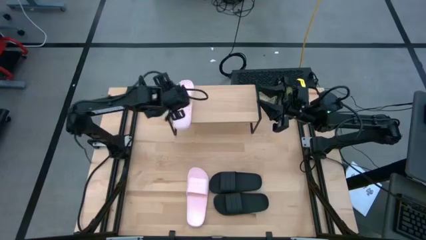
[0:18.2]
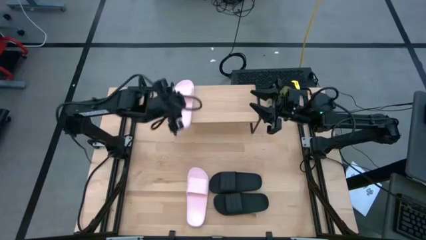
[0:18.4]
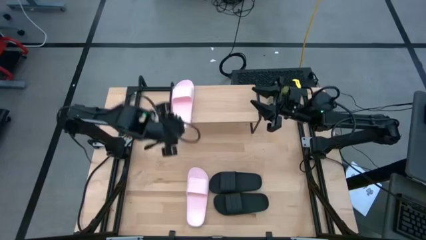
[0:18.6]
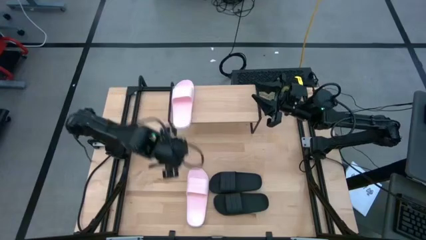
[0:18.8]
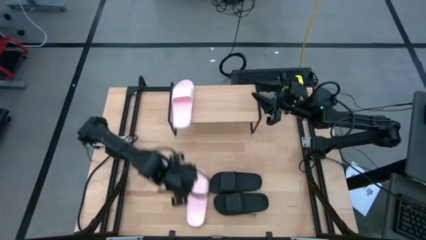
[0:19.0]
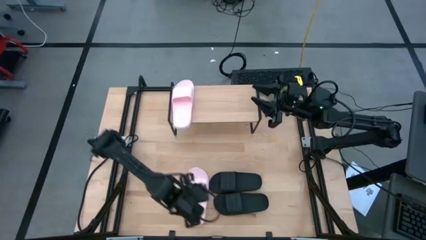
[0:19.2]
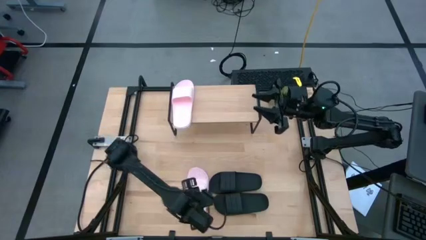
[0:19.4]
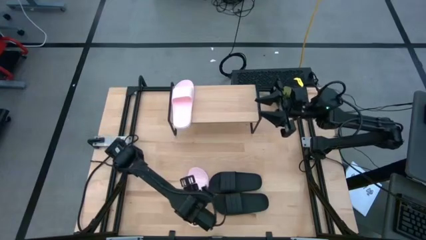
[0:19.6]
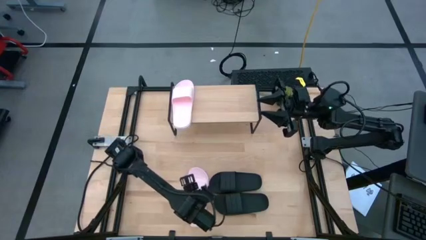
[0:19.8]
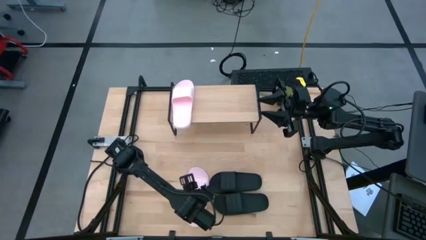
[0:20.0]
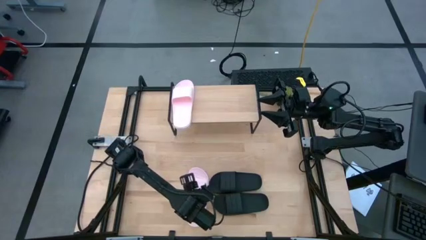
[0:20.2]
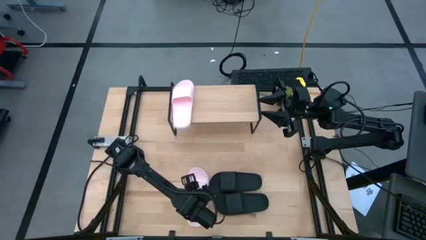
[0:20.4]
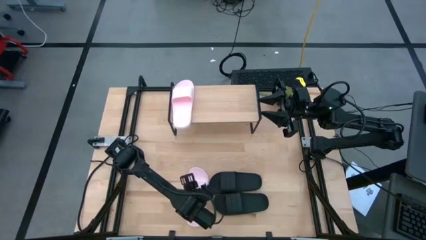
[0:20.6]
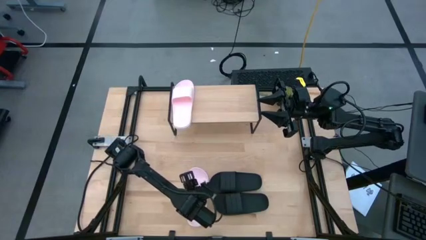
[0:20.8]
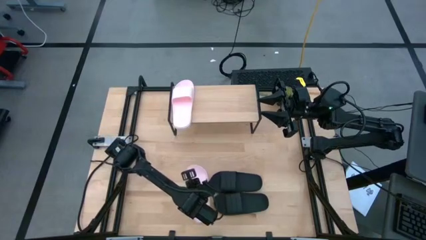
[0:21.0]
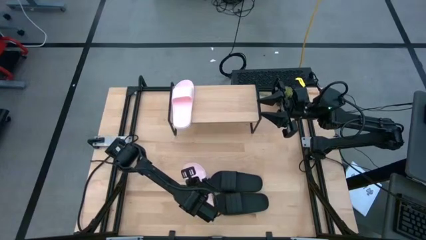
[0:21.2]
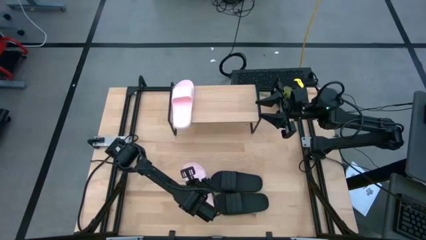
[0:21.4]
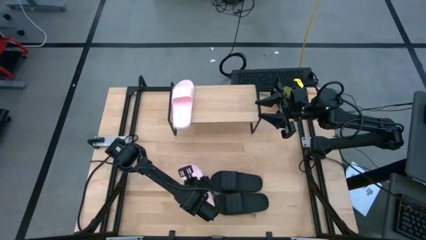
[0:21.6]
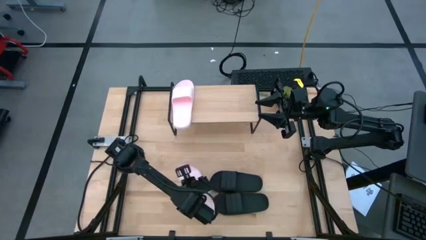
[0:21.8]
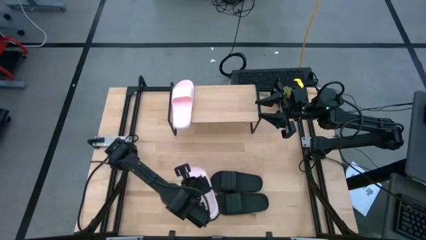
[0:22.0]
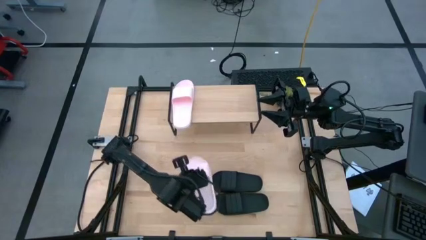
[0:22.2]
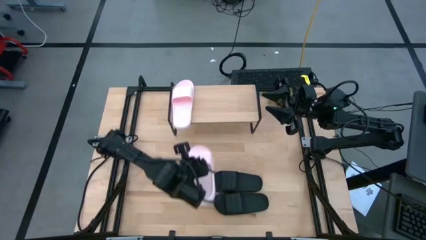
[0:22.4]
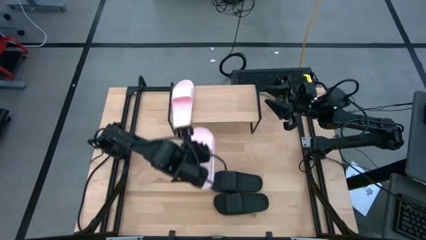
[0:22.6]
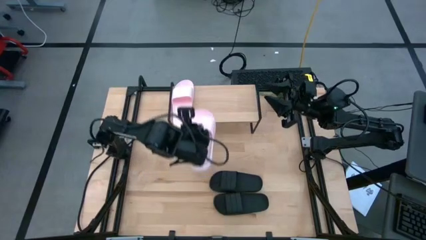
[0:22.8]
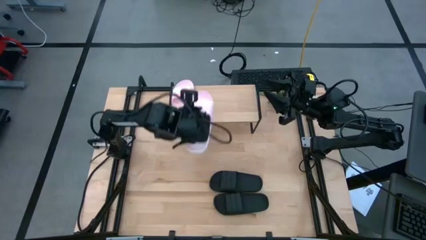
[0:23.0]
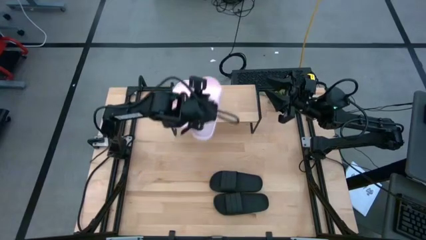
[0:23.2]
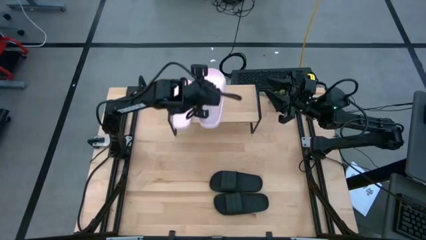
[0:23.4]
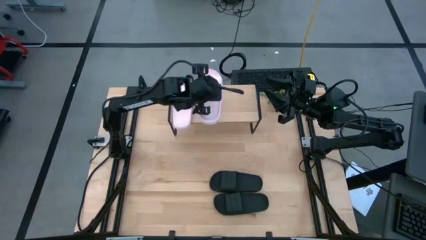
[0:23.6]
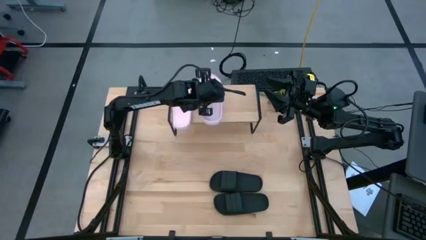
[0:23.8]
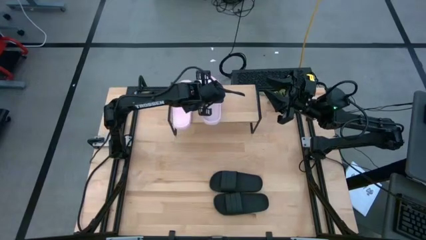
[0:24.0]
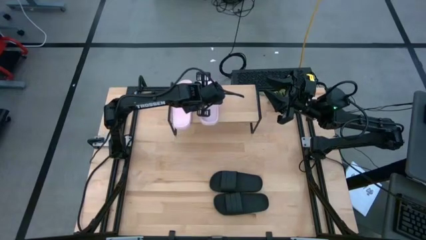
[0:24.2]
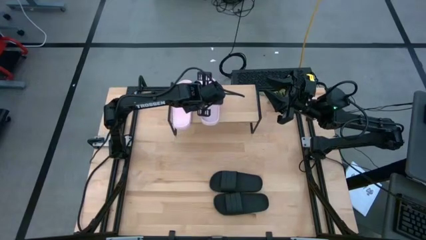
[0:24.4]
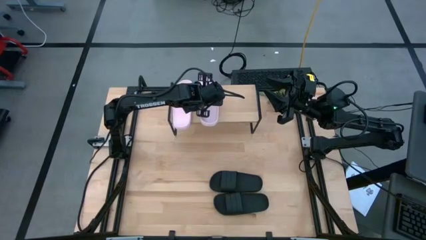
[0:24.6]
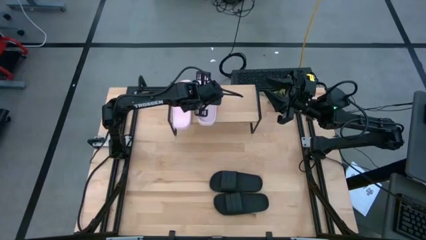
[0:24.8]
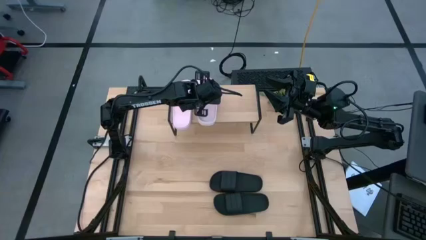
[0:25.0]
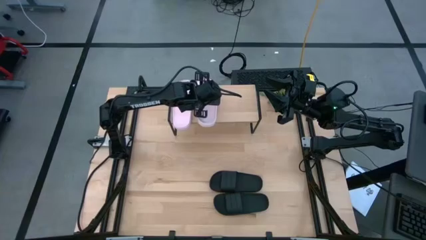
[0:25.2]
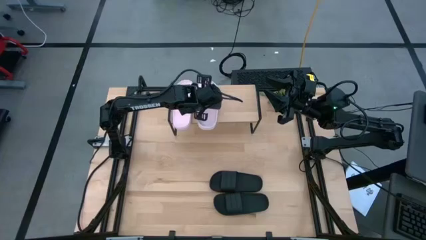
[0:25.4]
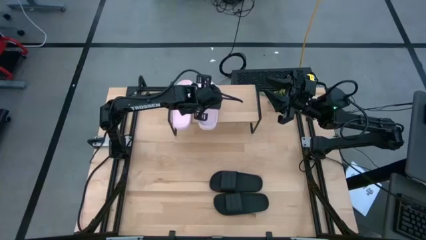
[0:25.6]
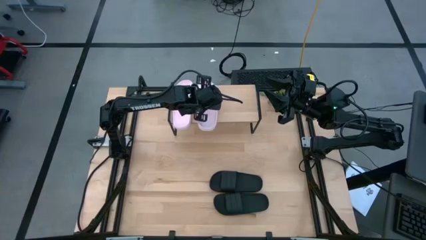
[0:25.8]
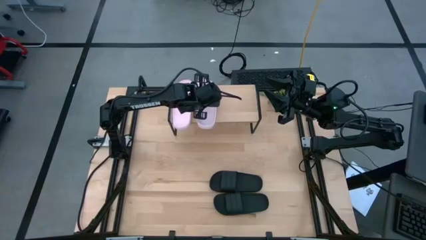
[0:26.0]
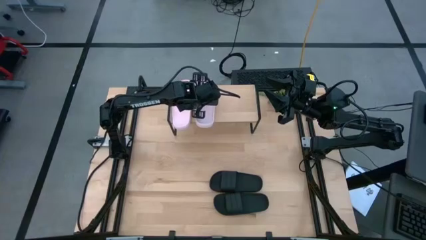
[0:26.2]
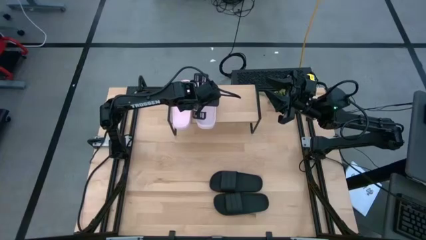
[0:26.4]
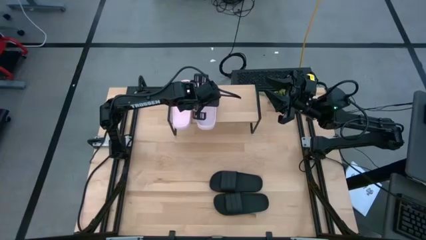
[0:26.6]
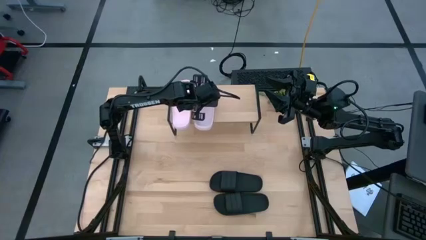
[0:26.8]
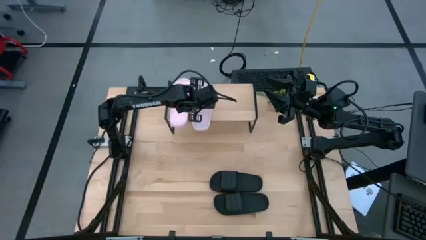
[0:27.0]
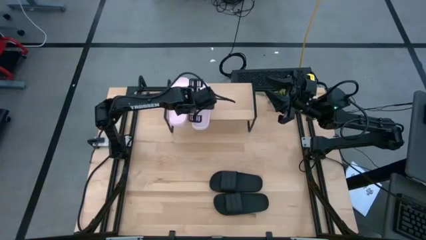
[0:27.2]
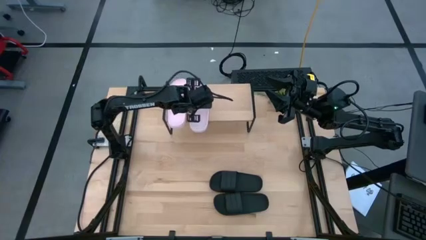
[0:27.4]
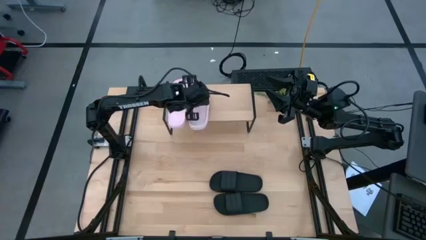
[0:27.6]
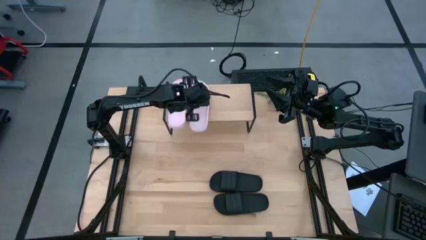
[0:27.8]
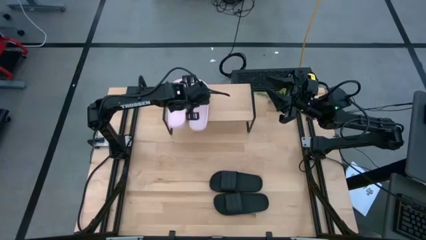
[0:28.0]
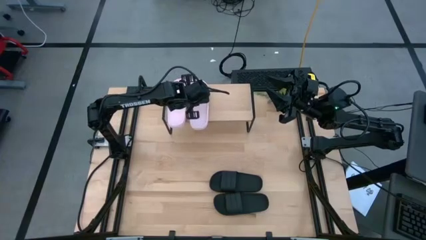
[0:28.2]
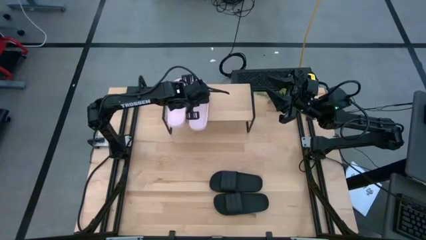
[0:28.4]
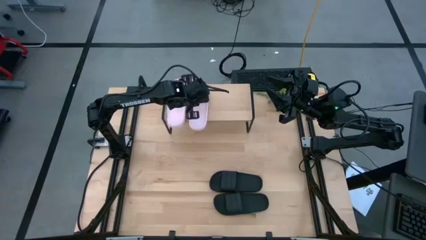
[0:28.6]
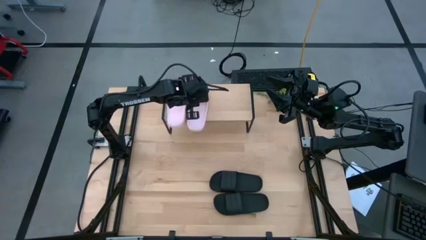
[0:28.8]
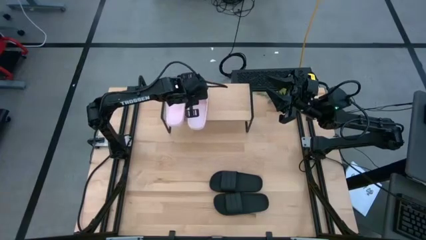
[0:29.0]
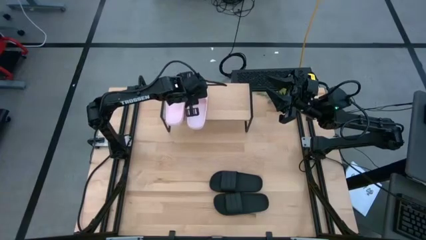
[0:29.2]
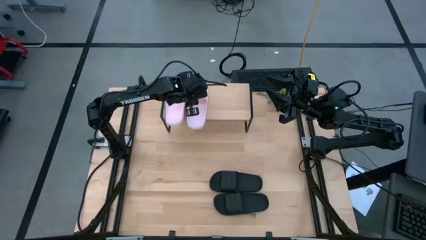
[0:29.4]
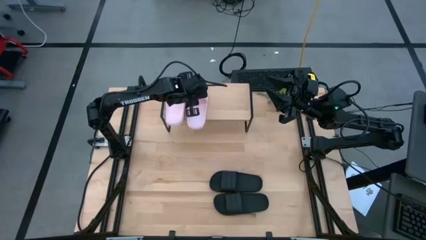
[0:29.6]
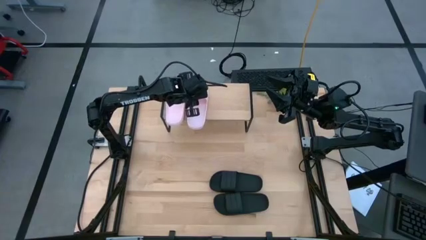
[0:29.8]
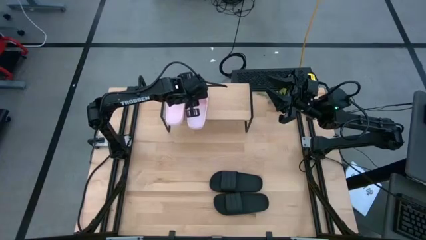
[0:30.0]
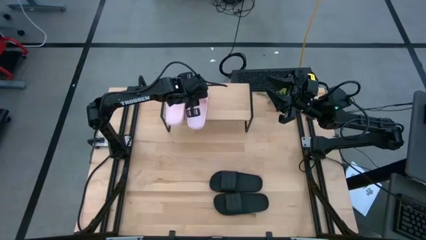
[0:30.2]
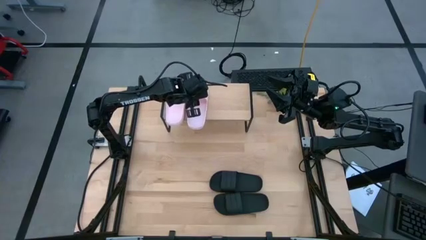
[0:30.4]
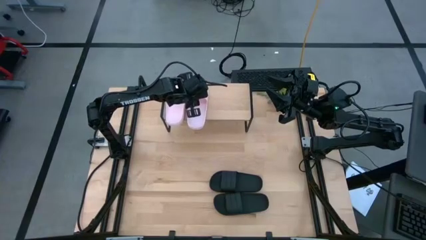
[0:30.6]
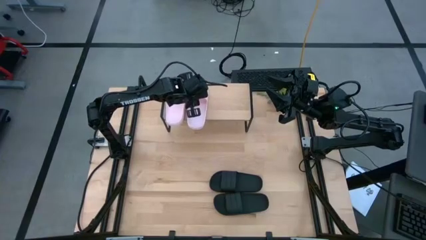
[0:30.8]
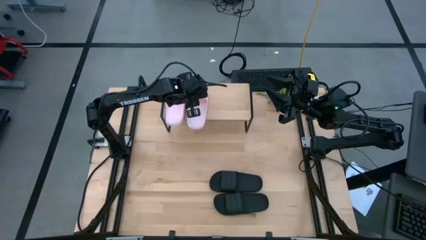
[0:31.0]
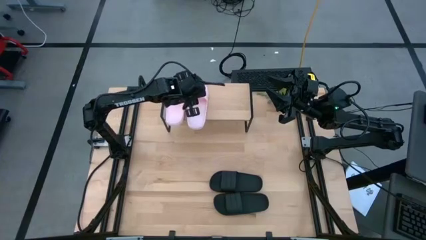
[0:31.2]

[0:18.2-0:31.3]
Task: Pick and place slides into the shelf
Put the pink slipper on the shelf
